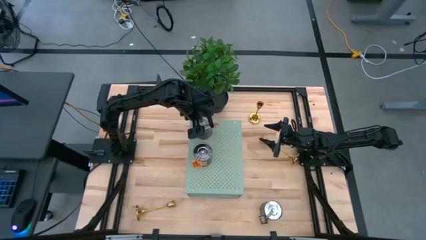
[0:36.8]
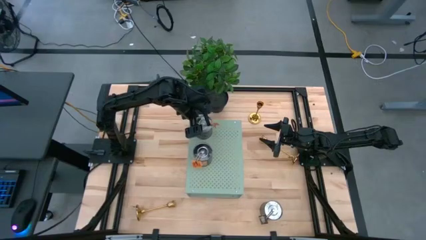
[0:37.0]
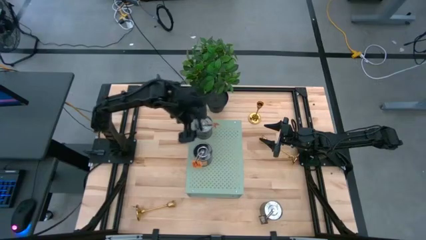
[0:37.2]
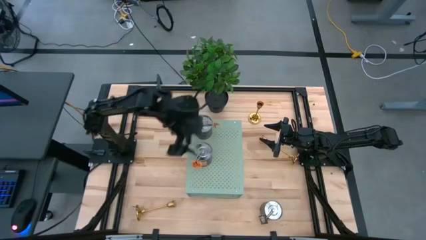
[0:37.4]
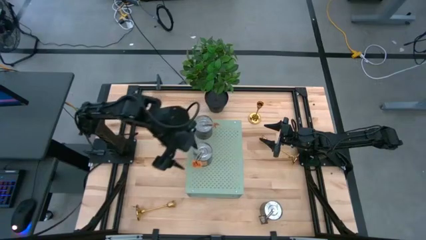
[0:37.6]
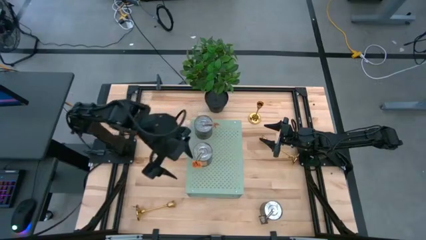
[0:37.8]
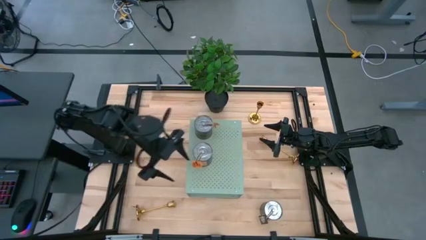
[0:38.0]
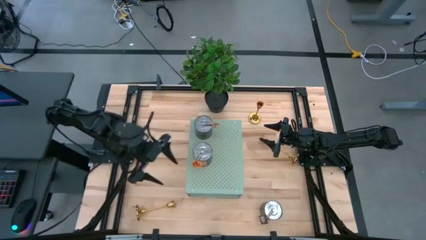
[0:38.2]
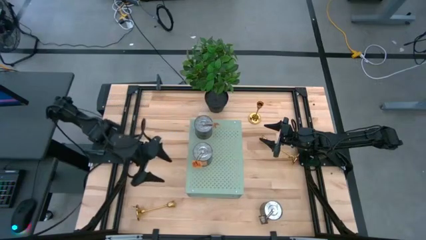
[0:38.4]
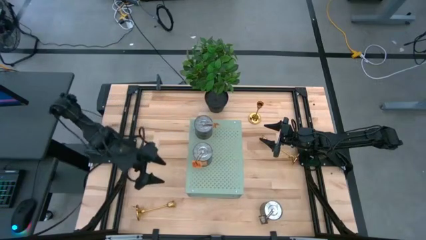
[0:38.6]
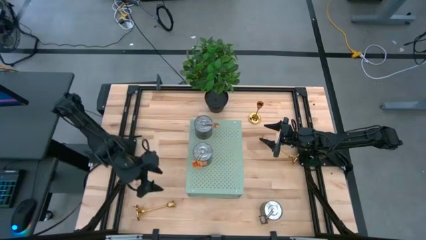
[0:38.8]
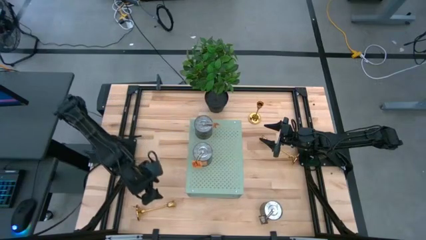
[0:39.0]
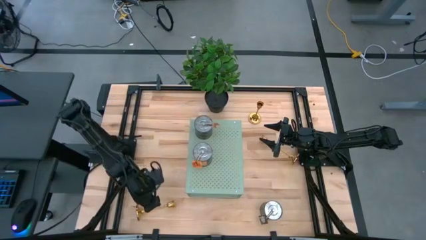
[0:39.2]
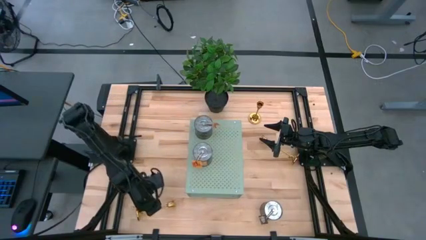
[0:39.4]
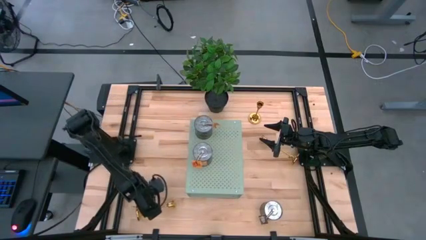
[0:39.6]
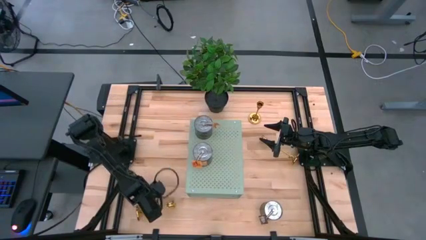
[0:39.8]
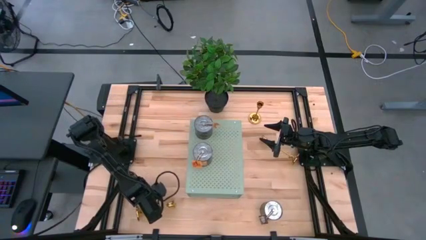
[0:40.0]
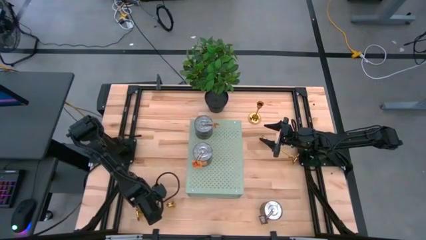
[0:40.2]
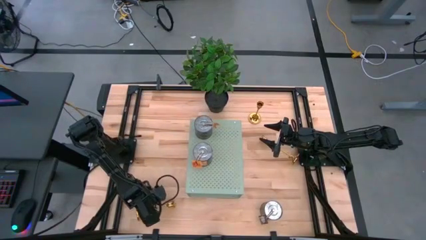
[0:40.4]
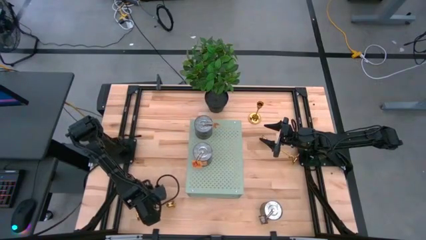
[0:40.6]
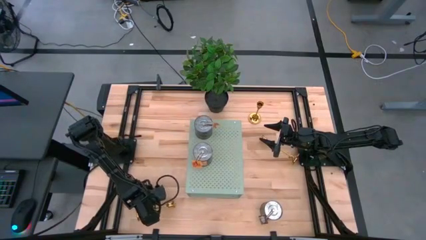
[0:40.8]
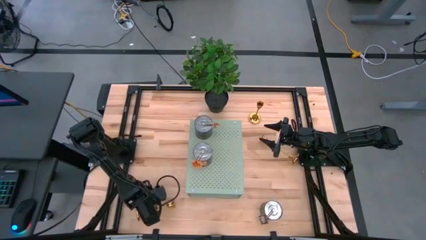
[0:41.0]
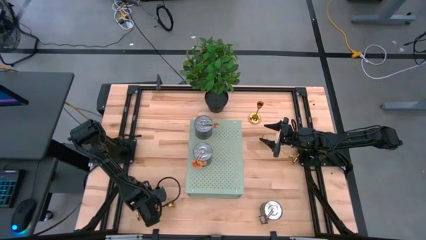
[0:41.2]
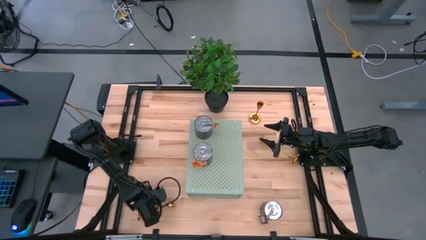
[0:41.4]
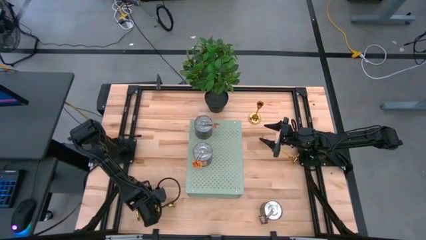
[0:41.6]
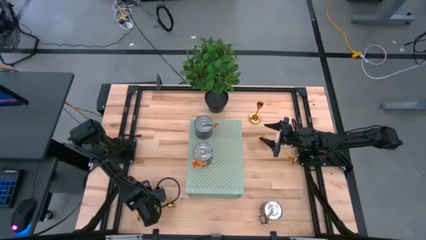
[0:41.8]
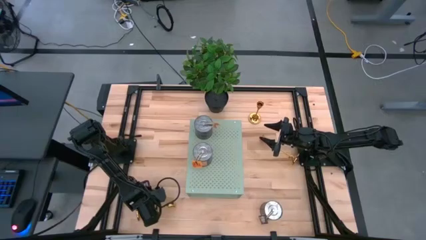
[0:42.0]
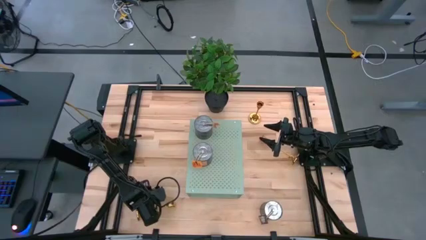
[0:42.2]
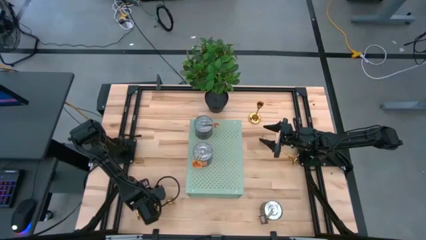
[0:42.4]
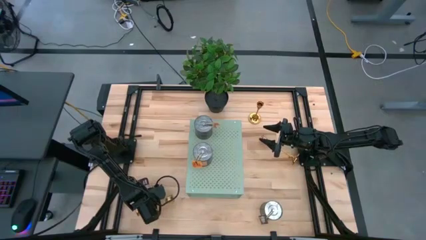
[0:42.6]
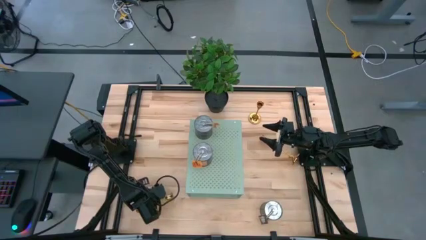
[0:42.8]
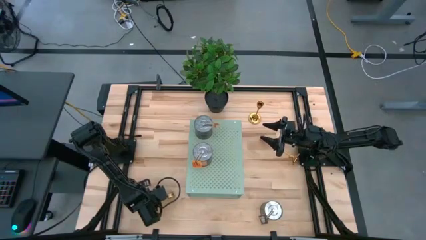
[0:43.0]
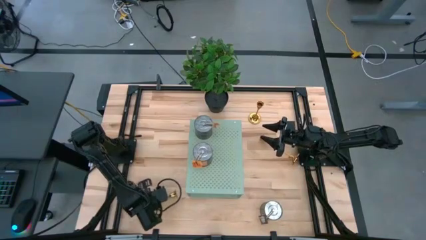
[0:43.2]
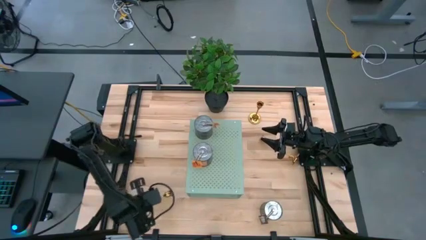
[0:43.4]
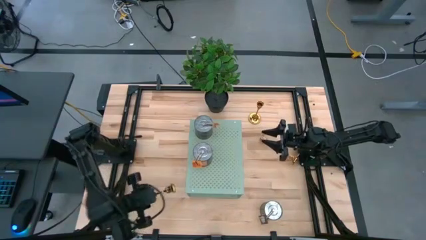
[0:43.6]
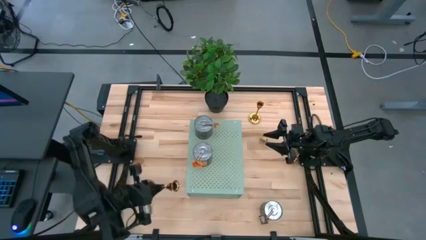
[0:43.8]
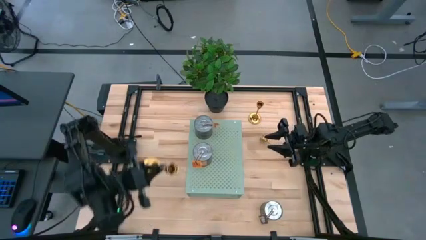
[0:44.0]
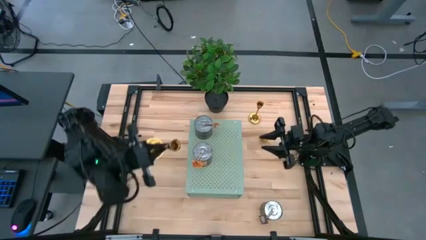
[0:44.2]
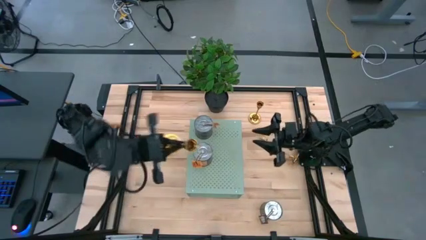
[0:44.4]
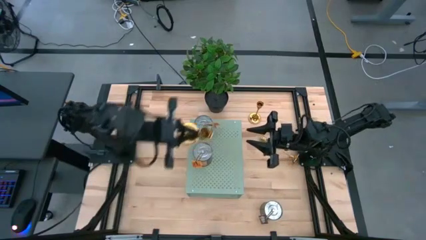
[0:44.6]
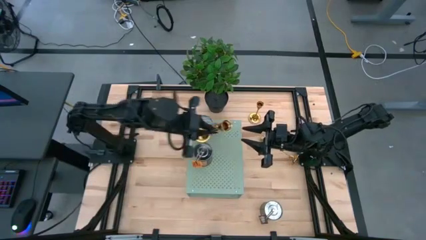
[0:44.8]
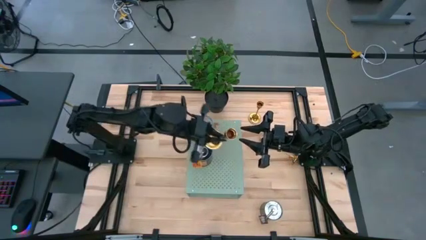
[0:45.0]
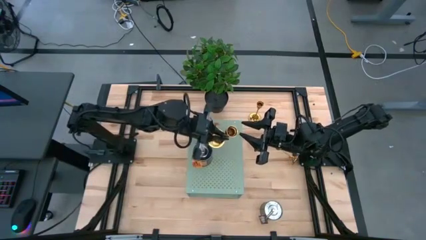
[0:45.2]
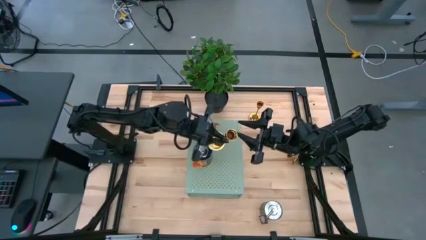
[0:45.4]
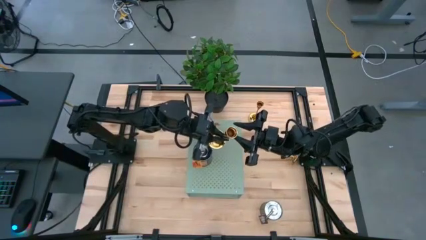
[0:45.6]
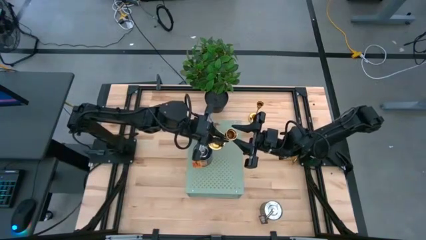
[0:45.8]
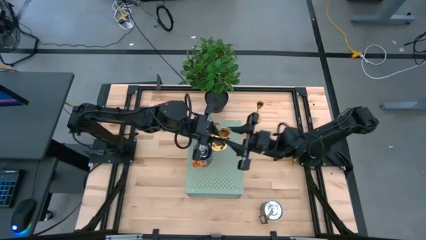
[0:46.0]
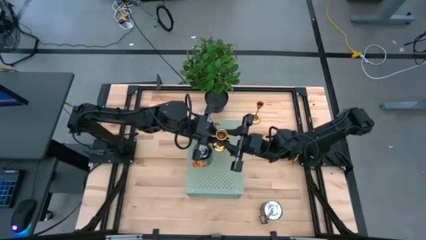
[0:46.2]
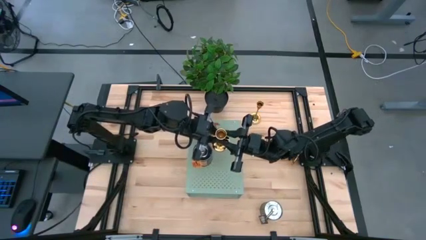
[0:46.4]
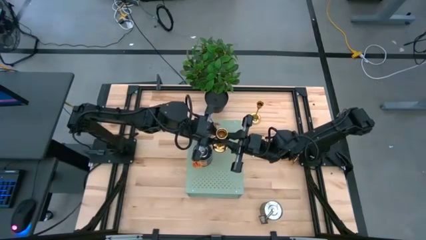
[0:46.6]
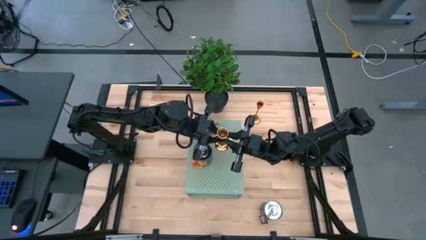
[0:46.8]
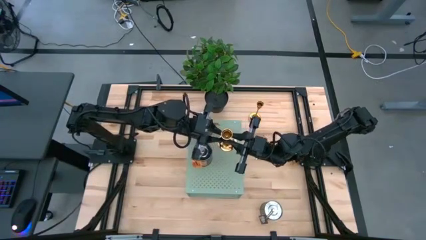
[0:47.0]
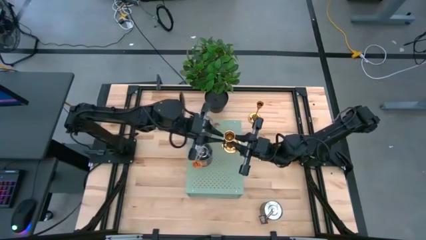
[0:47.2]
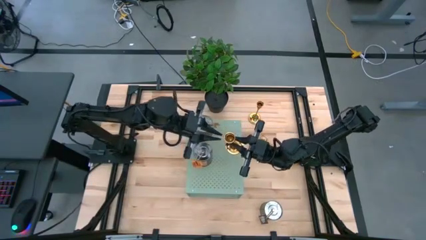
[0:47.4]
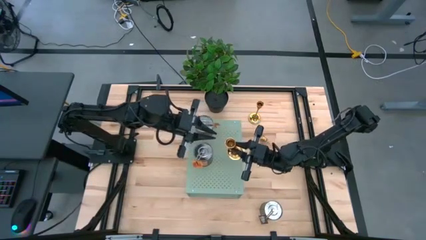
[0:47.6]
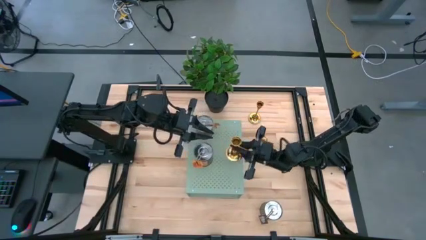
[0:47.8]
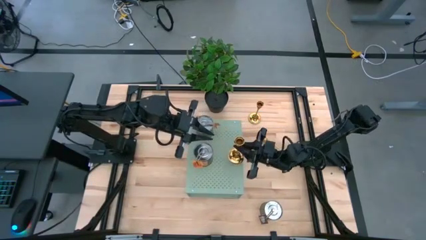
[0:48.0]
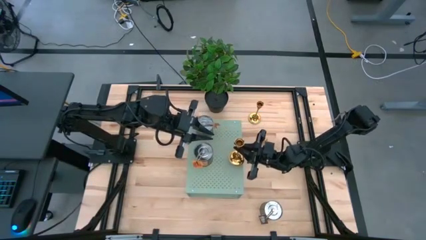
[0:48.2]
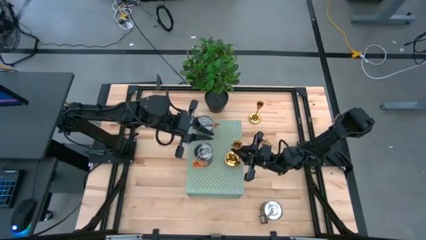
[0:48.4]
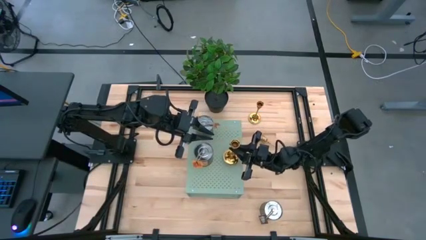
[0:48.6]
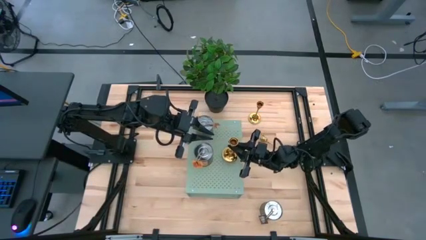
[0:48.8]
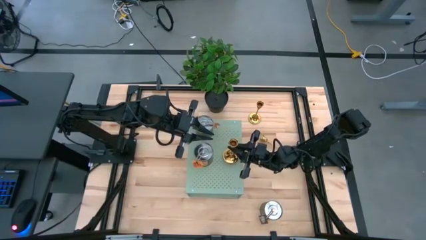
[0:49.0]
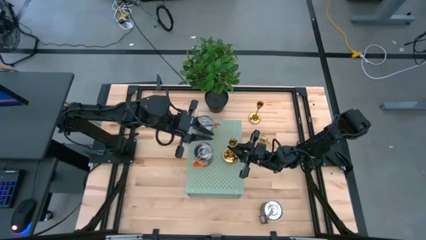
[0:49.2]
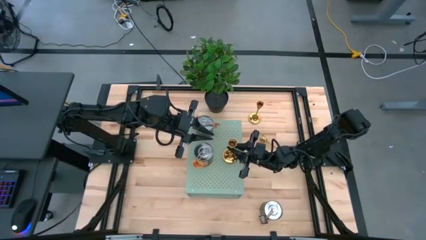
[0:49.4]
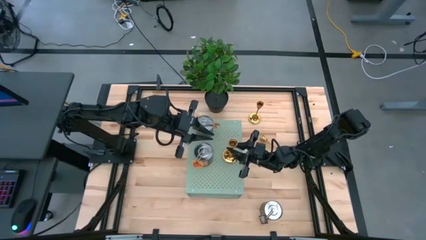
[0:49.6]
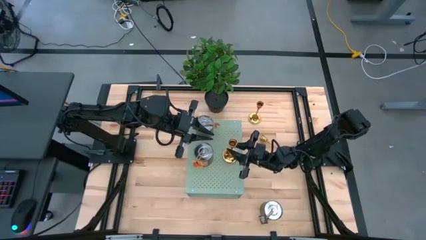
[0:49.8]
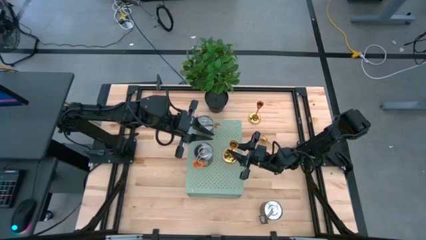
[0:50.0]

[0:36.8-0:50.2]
Task: Pick & Place candle stick holders
Put the bottom gold candle holder on the shelf
